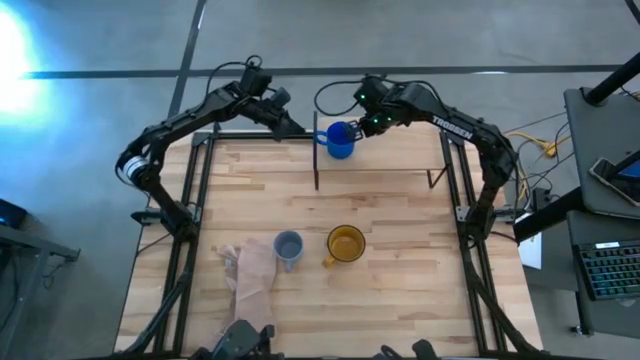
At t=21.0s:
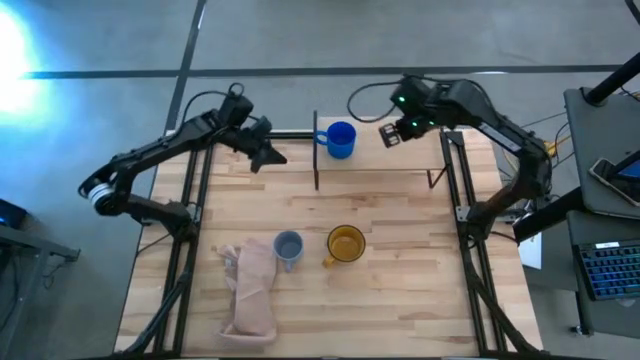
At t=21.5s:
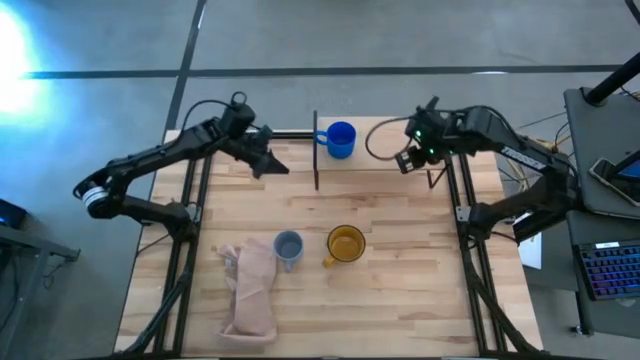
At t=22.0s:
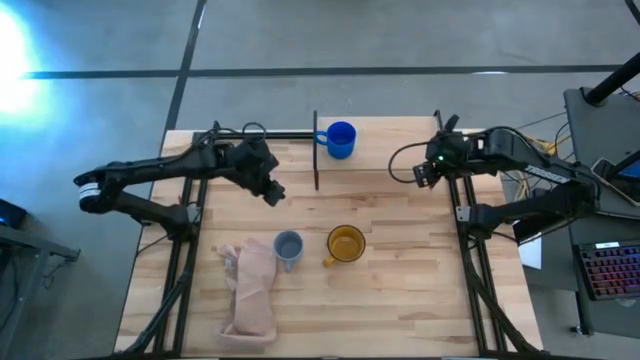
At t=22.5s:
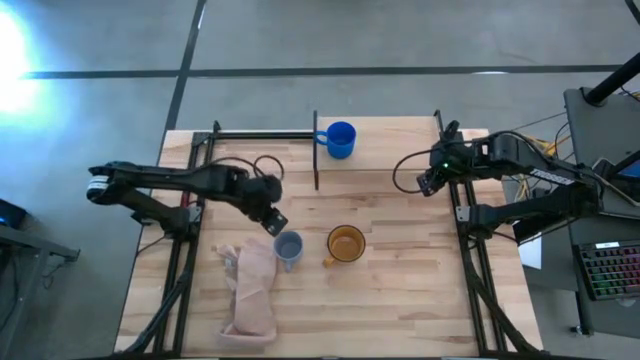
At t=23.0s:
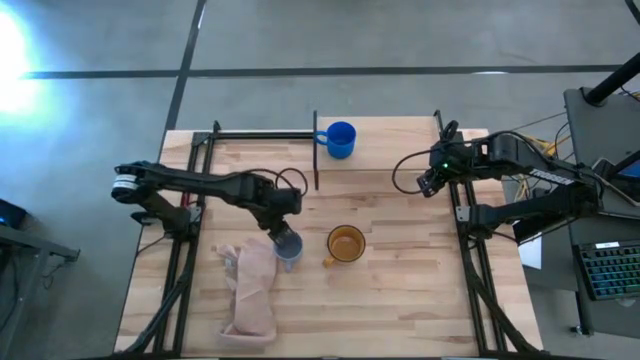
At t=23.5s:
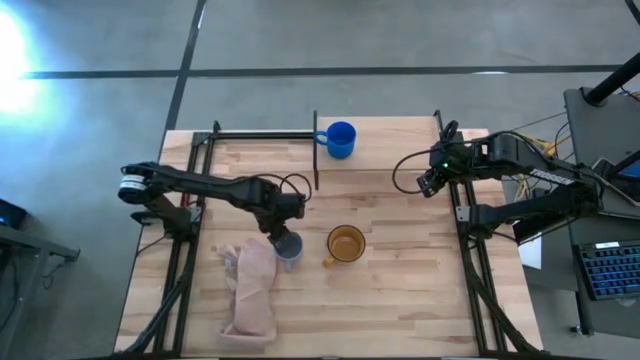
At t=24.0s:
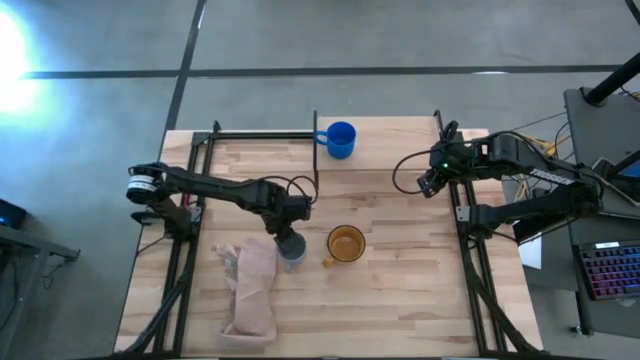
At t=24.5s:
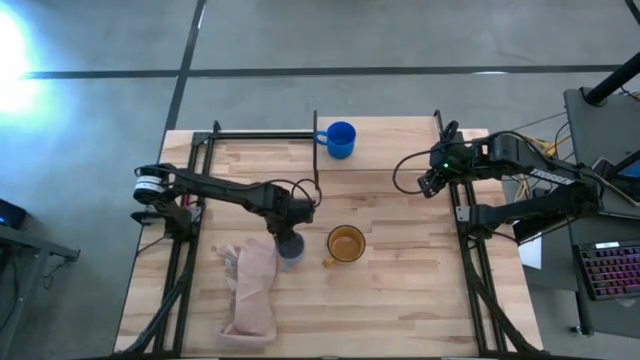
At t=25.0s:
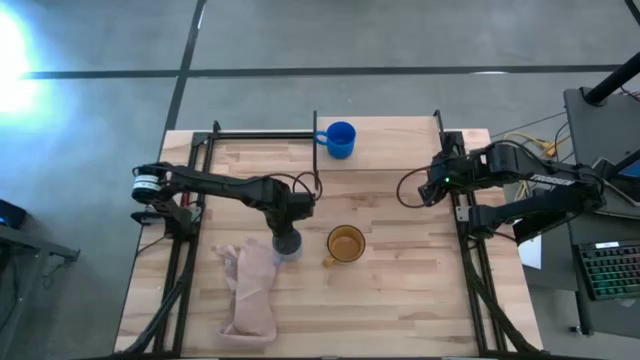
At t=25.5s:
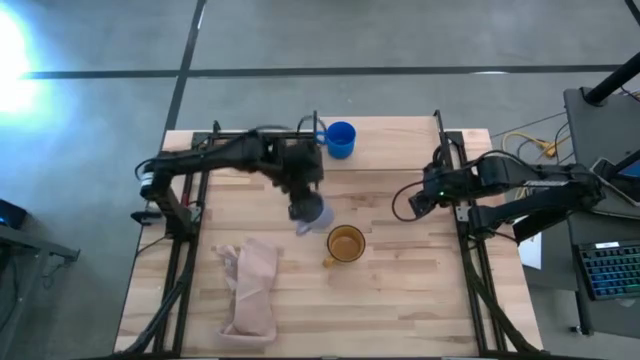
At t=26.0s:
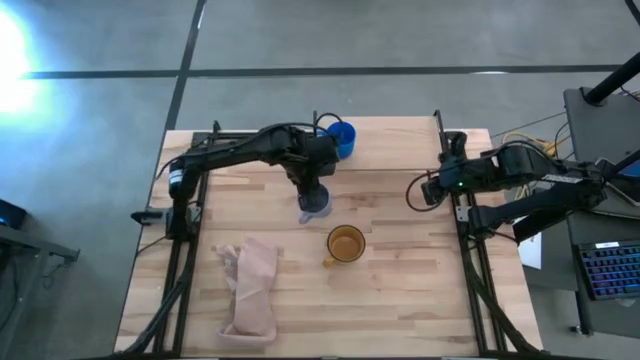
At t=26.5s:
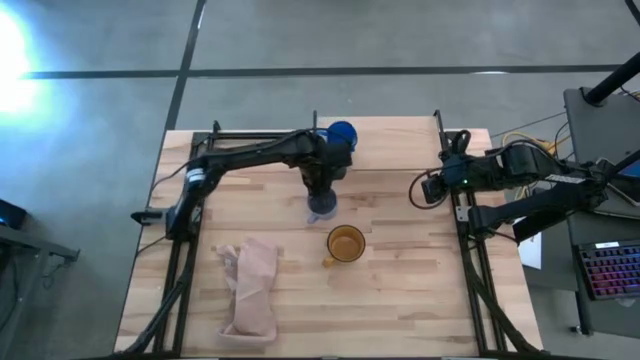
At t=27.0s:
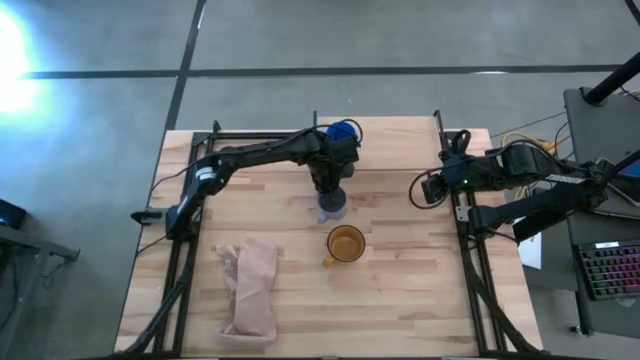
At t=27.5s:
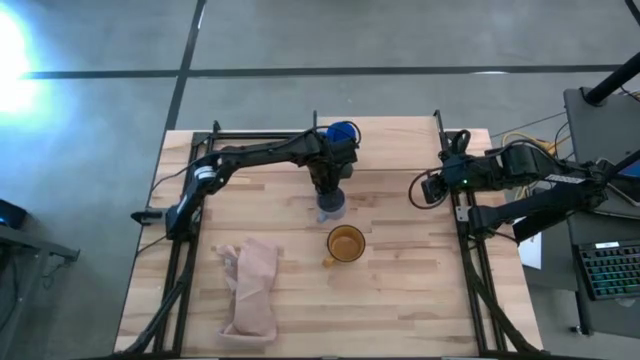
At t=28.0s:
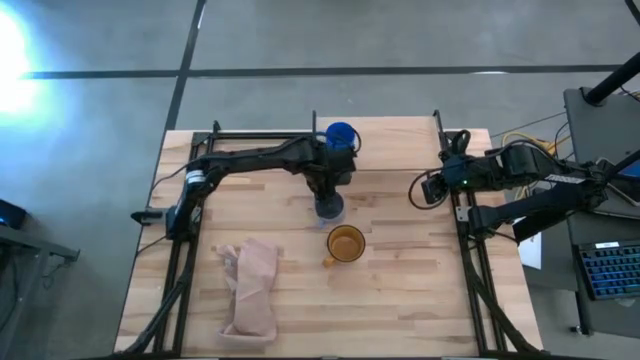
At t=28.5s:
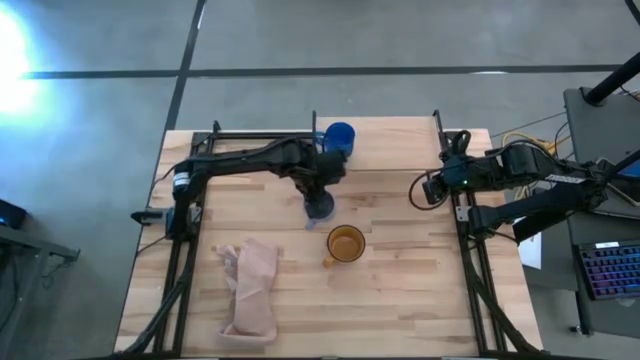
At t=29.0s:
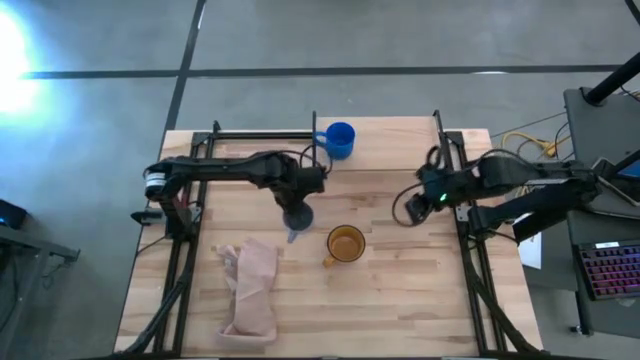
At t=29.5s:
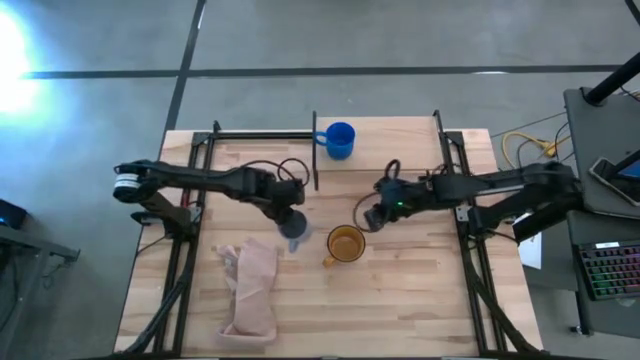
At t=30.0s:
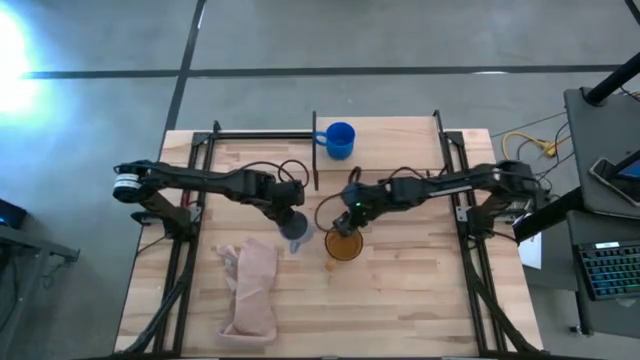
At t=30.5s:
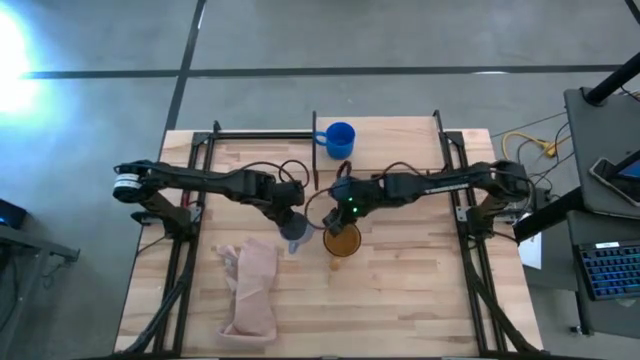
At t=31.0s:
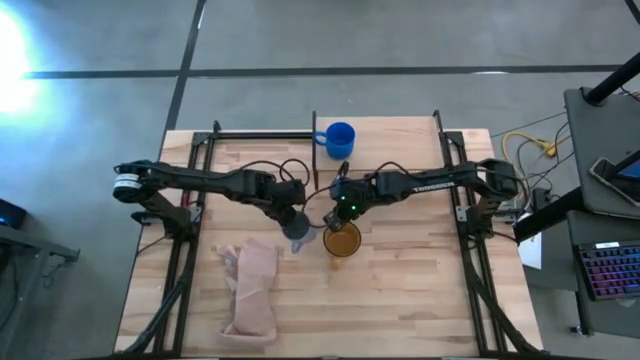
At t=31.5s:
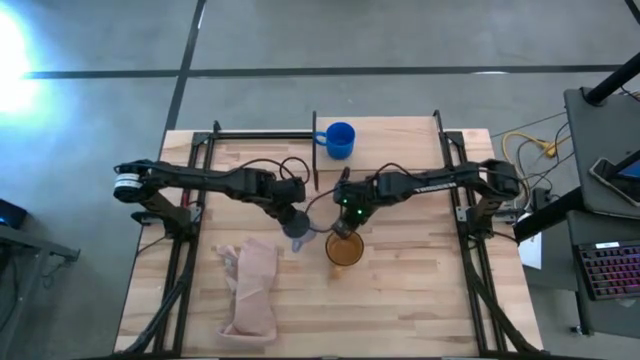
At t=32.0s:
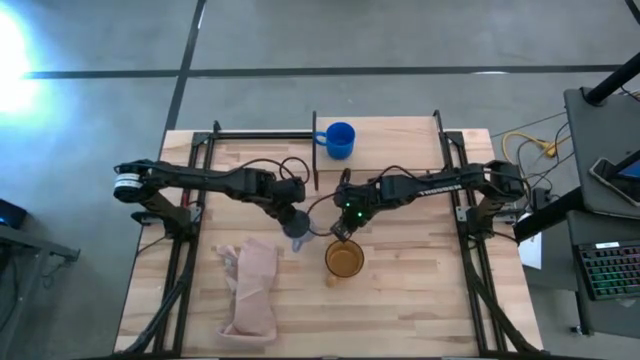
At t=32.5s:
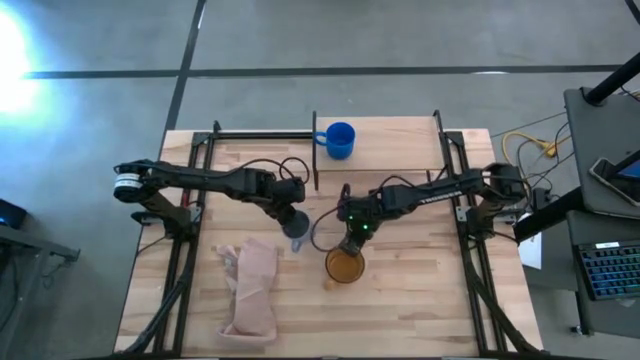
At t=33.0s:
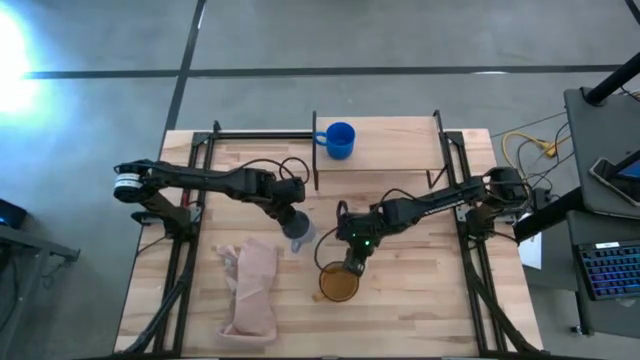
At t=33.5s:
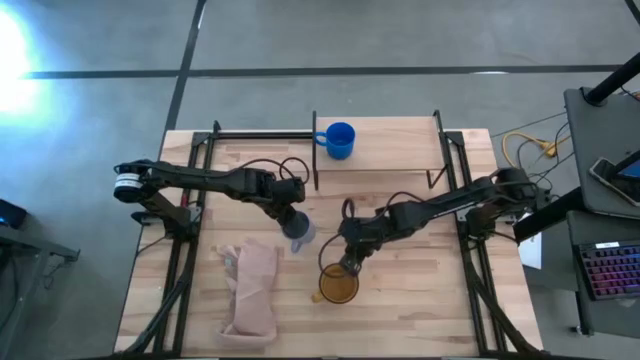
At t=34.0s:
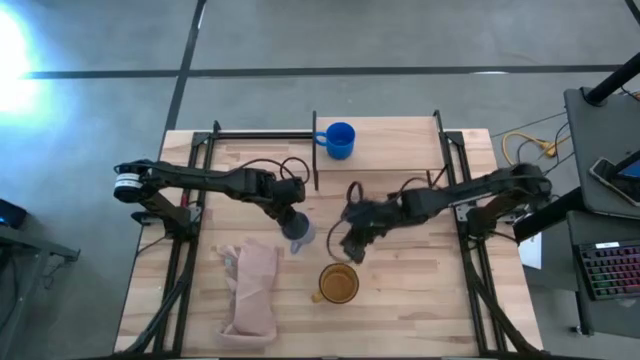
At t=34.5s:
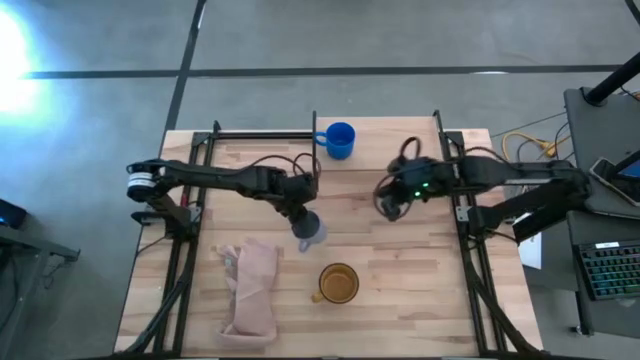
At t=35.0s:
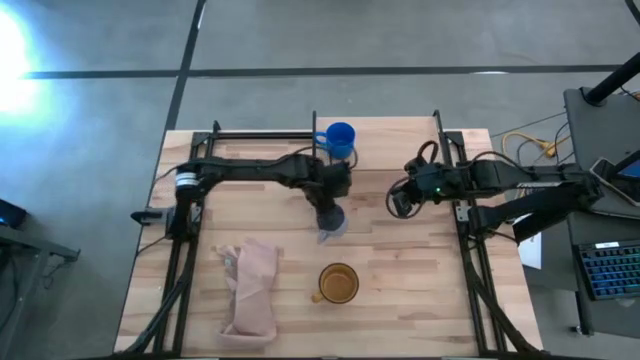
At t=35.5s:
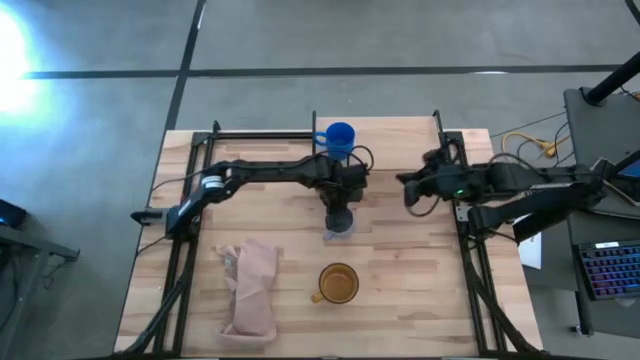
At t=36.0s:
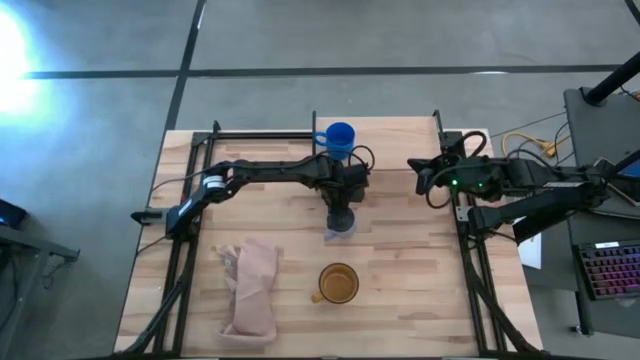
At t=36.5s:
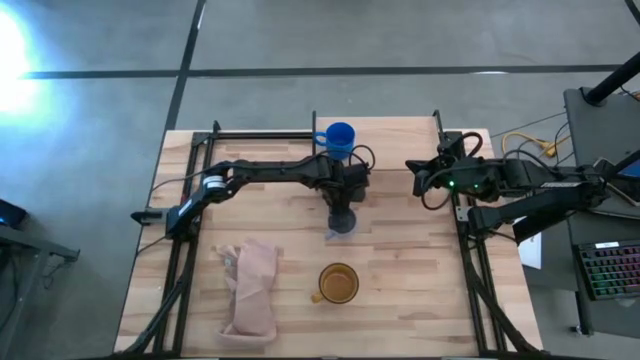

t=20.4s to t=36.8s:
Task: Stack small to large cups/mugs on shelf
Put the light blue mug on the shelf

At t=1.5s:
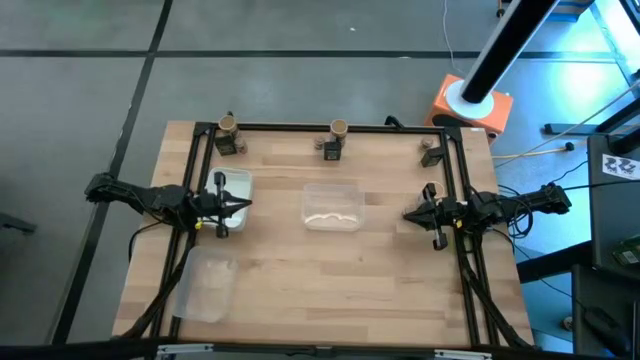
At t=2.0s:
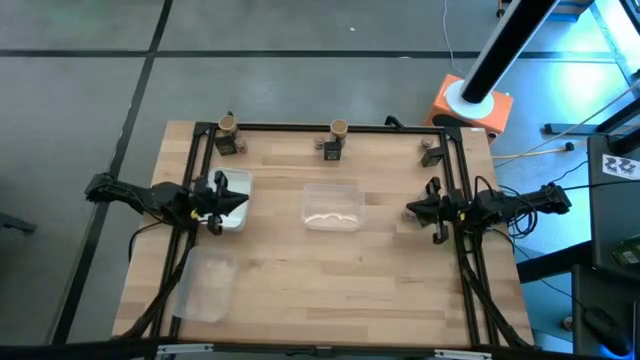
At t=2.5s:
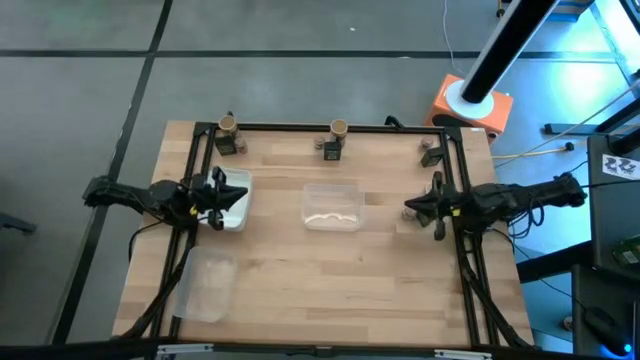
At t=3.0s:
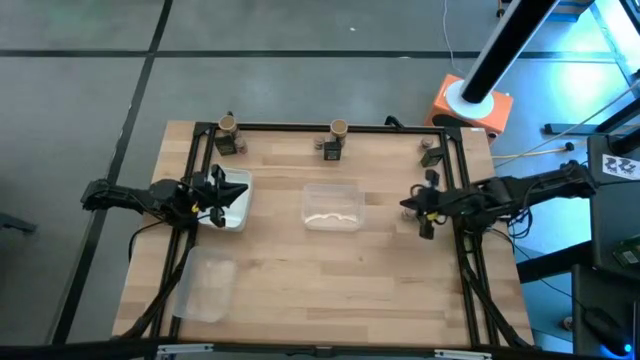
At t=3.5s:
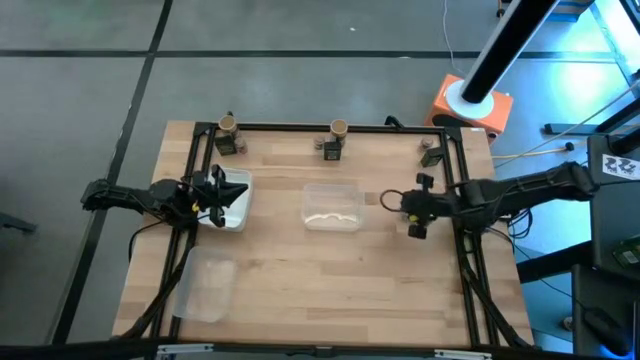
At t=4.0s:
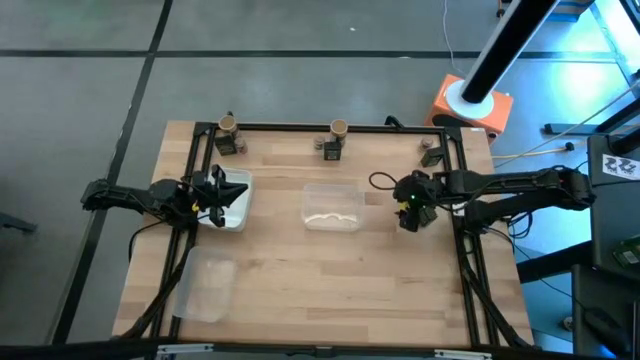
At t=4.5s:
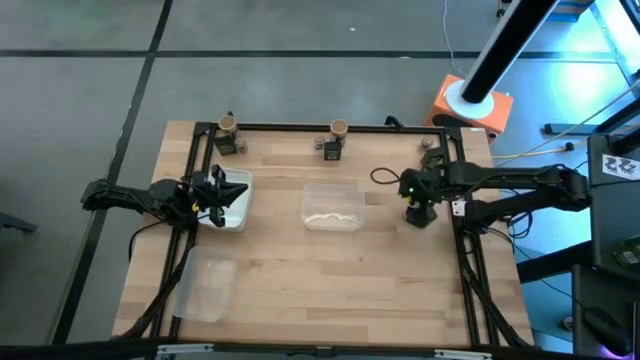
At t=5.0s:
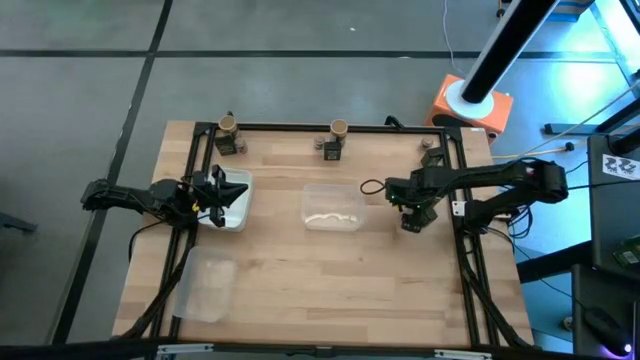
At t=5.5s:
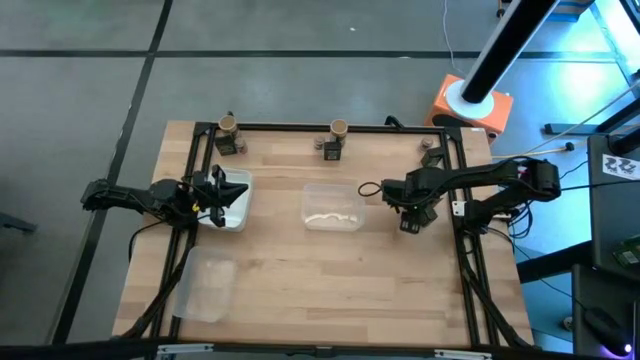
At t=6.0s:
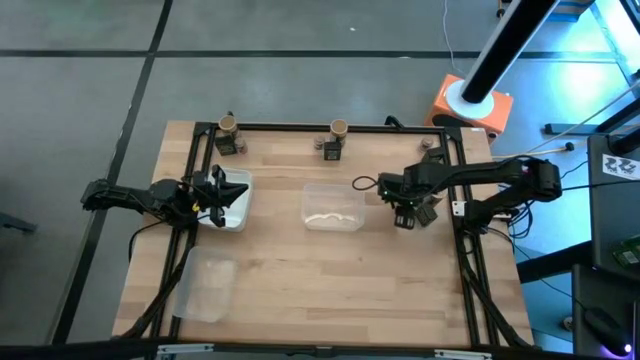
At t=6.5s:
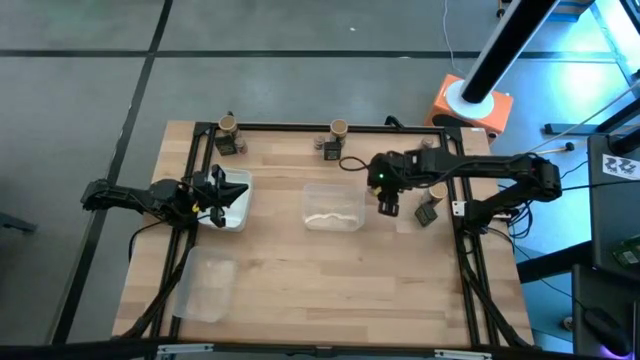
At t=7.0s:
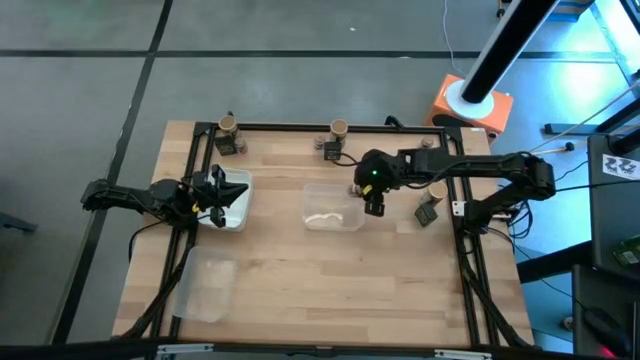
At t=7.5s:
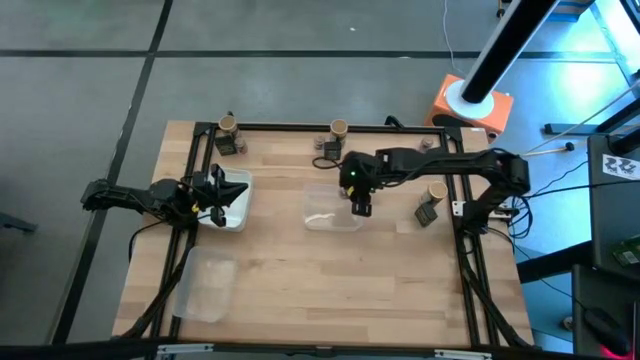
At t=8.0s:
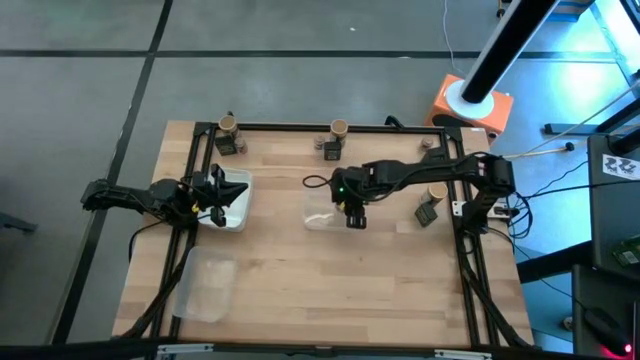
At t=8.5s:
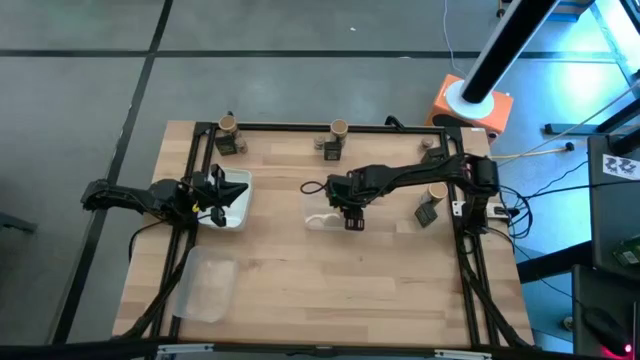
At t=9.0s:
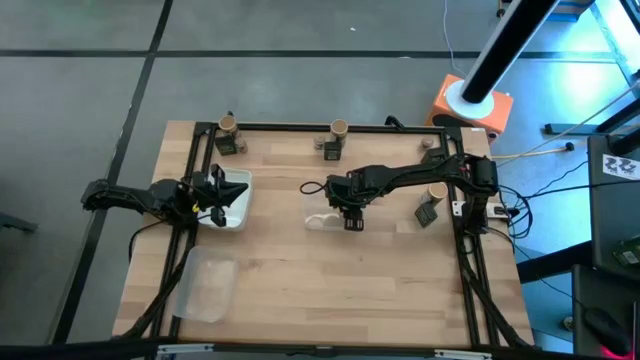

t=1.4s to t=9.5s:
Task: Sort spices by type
Put the brown seasoning bottle into the top transparent bin
